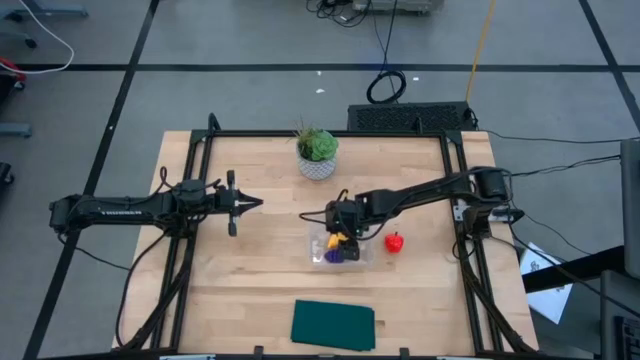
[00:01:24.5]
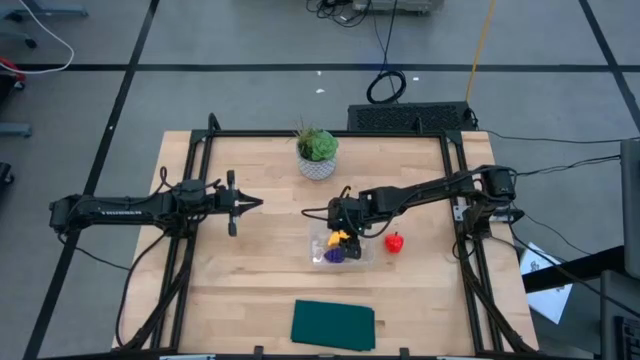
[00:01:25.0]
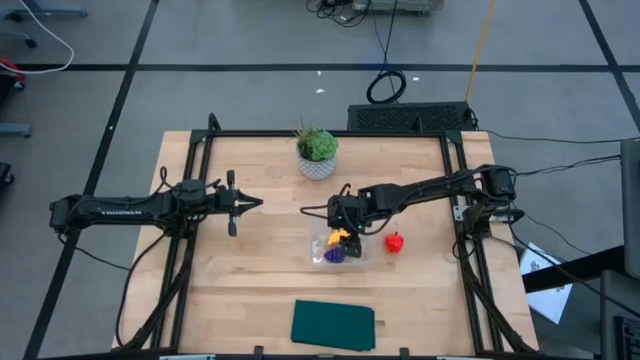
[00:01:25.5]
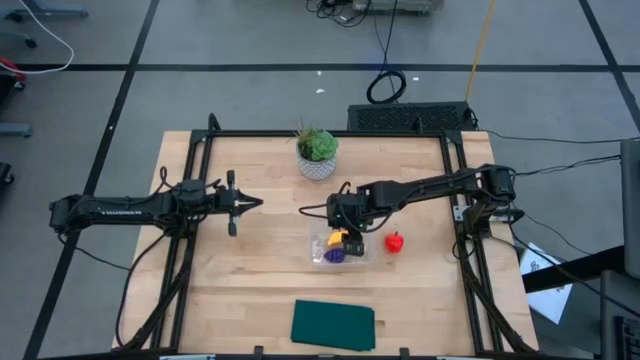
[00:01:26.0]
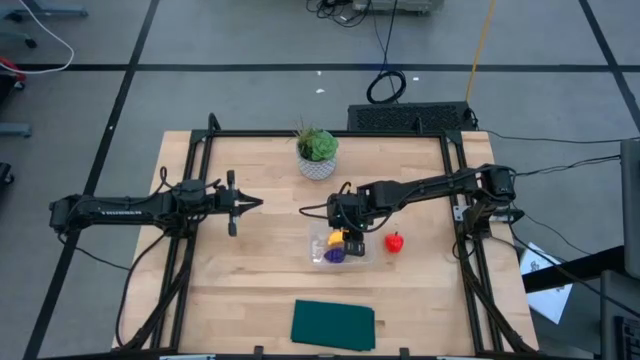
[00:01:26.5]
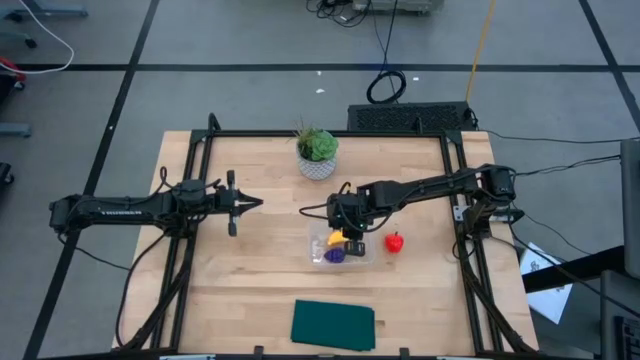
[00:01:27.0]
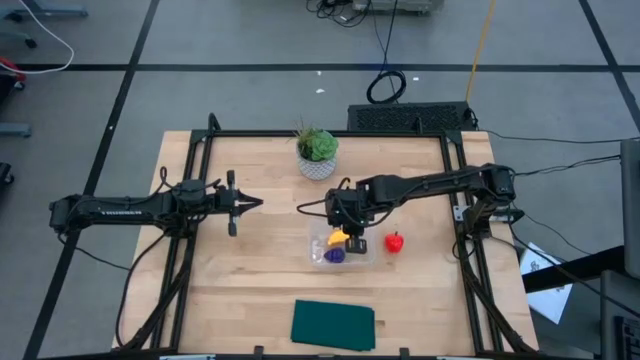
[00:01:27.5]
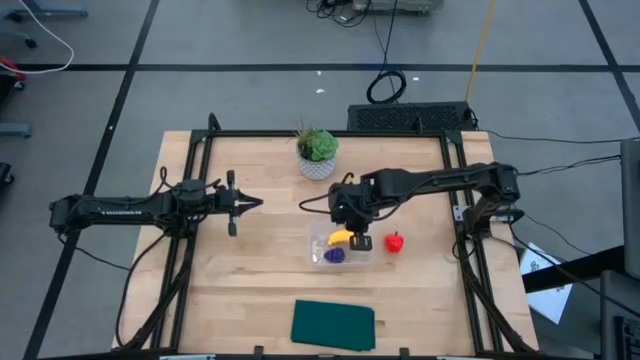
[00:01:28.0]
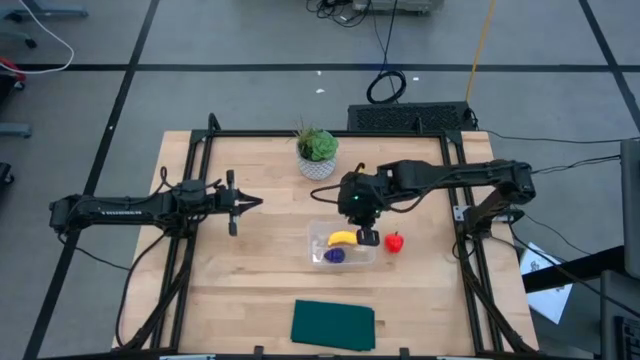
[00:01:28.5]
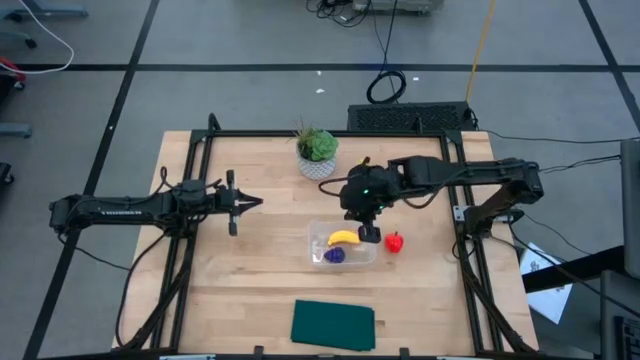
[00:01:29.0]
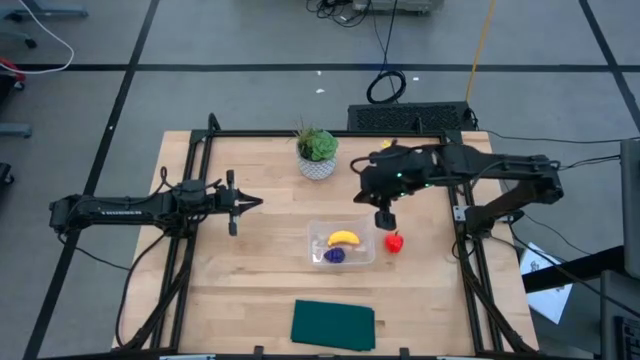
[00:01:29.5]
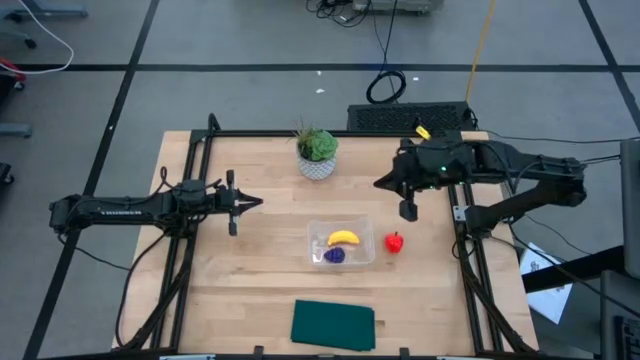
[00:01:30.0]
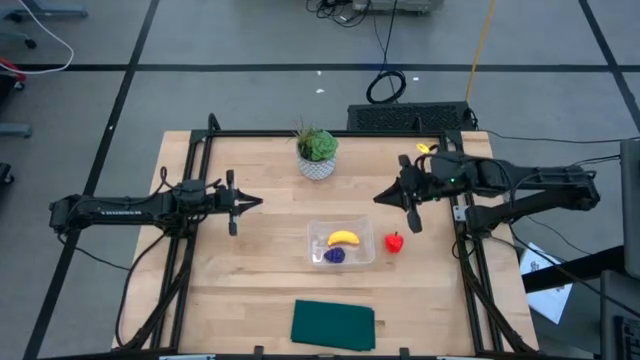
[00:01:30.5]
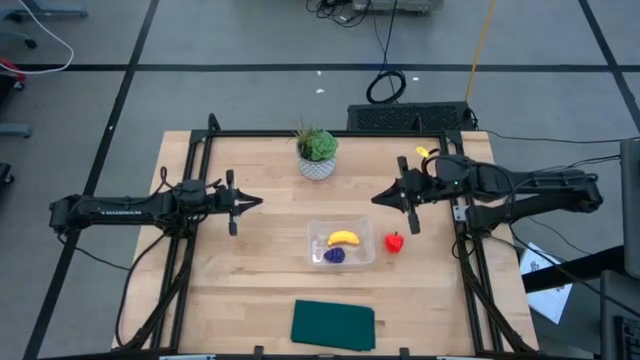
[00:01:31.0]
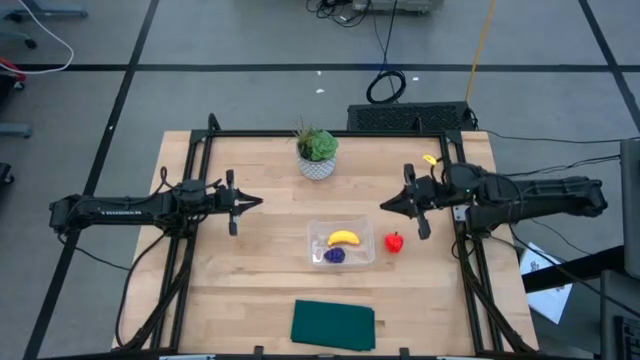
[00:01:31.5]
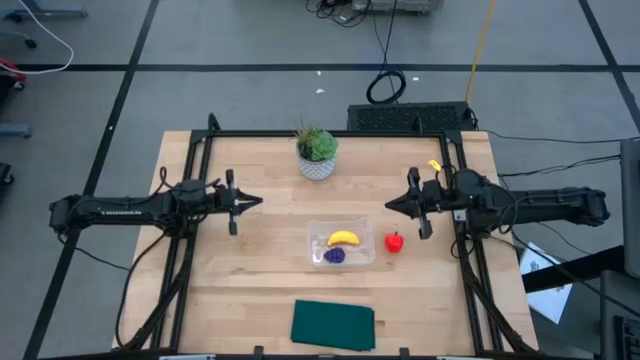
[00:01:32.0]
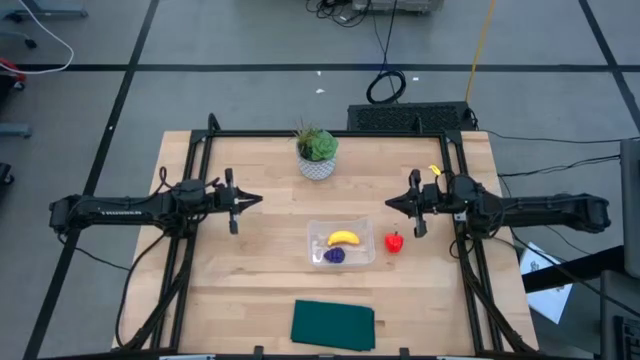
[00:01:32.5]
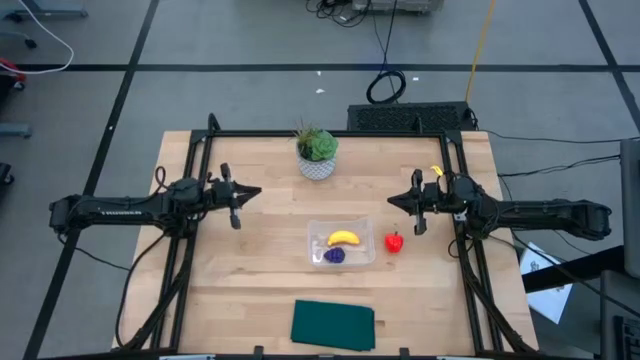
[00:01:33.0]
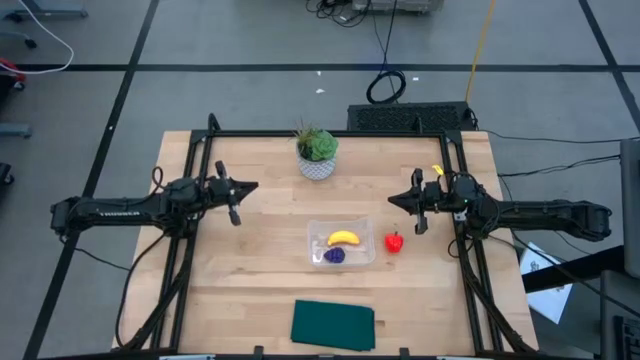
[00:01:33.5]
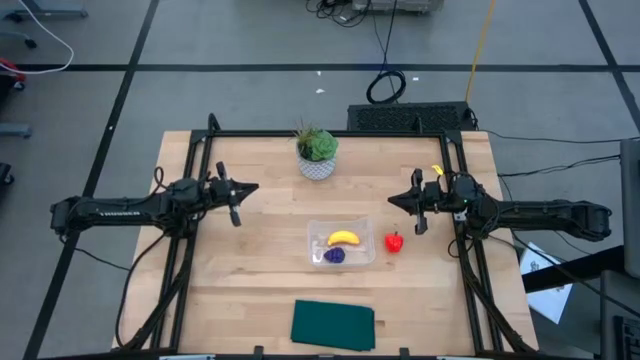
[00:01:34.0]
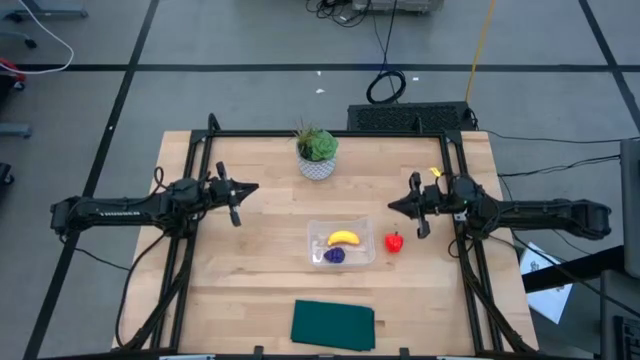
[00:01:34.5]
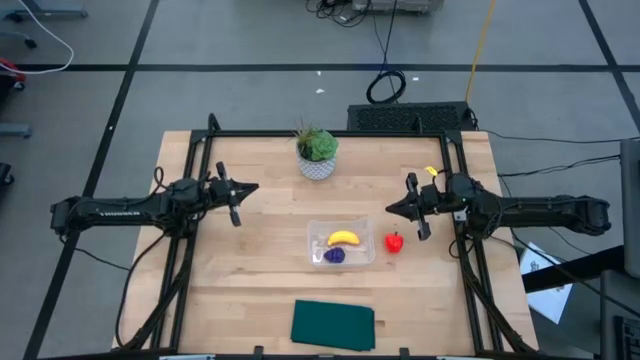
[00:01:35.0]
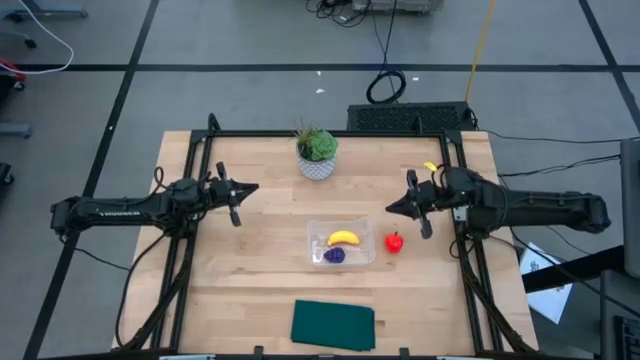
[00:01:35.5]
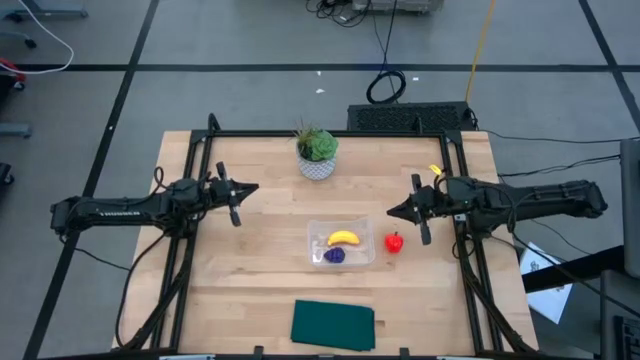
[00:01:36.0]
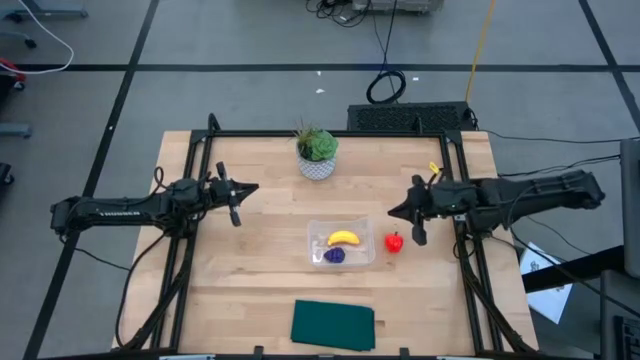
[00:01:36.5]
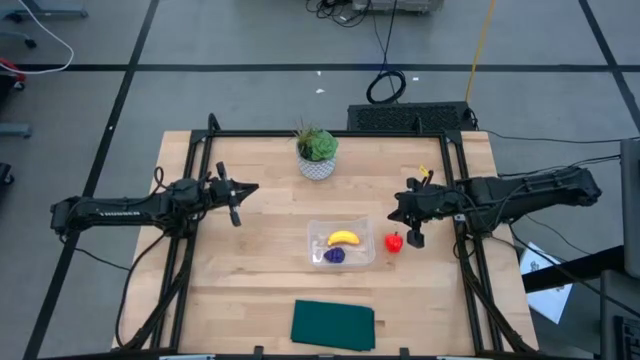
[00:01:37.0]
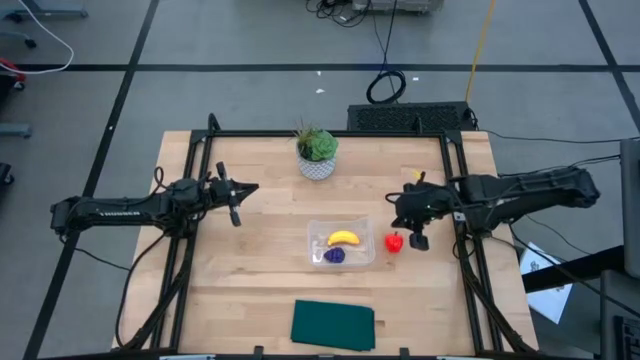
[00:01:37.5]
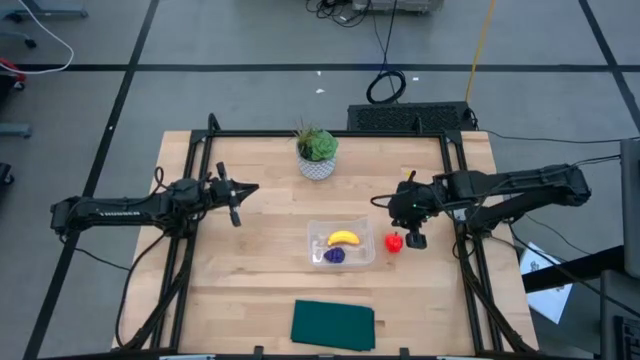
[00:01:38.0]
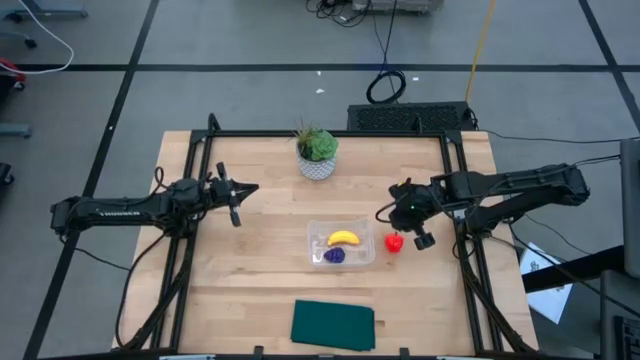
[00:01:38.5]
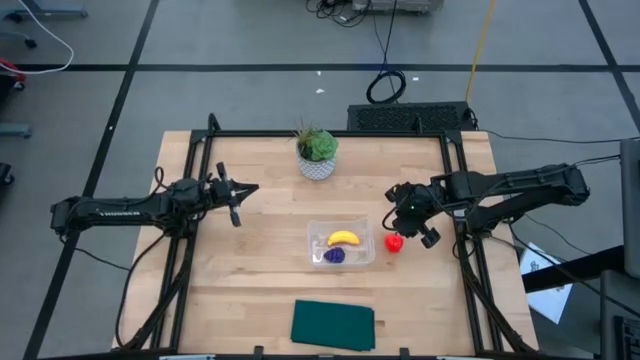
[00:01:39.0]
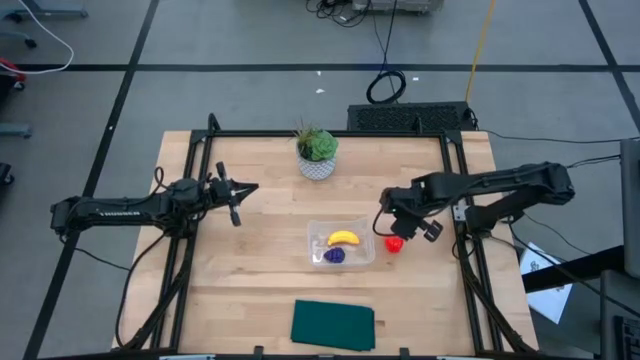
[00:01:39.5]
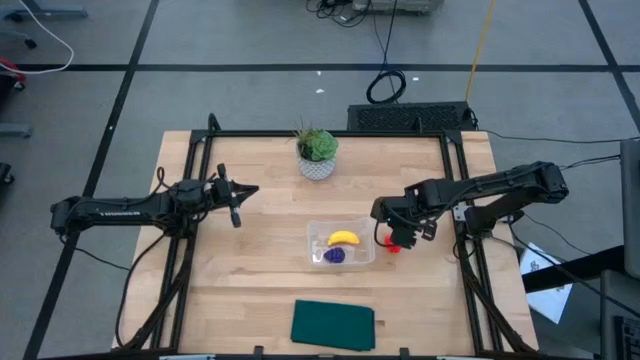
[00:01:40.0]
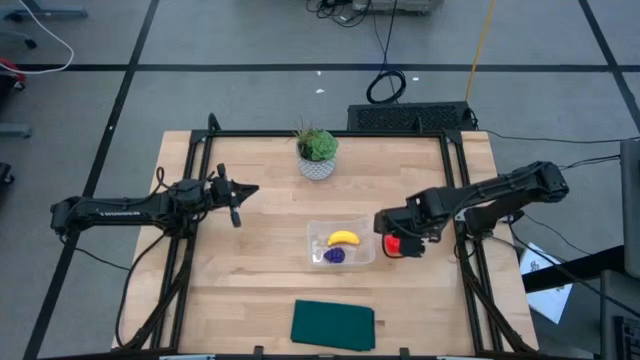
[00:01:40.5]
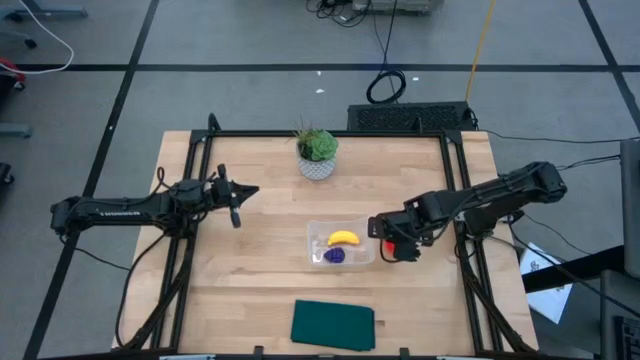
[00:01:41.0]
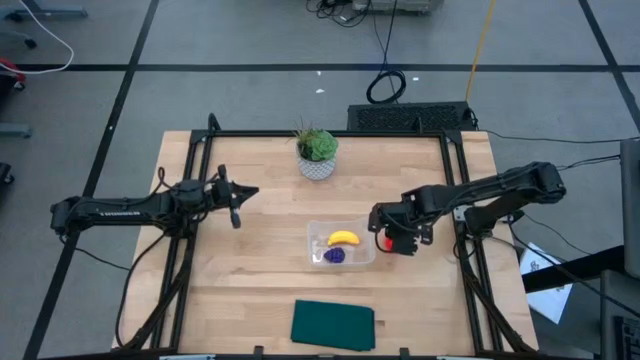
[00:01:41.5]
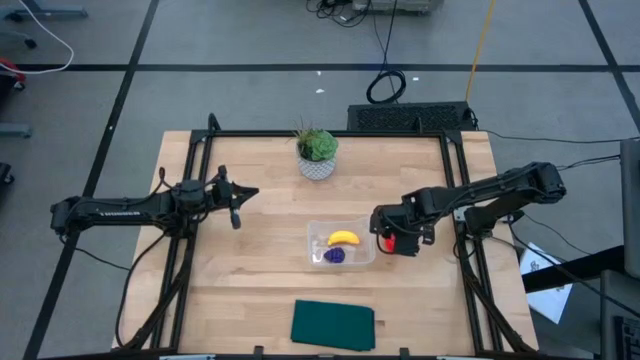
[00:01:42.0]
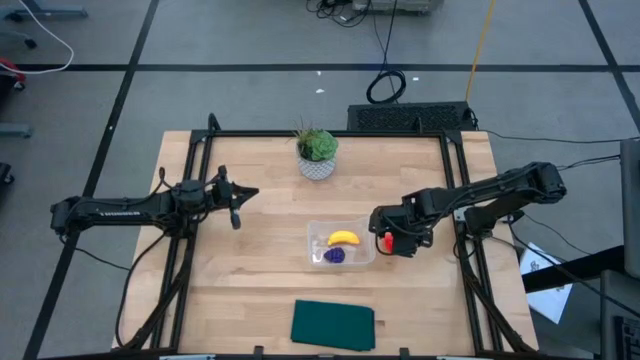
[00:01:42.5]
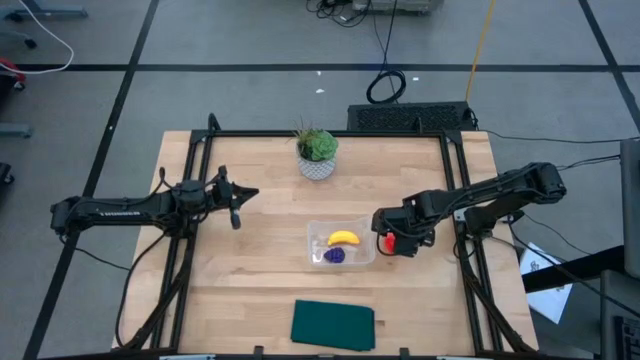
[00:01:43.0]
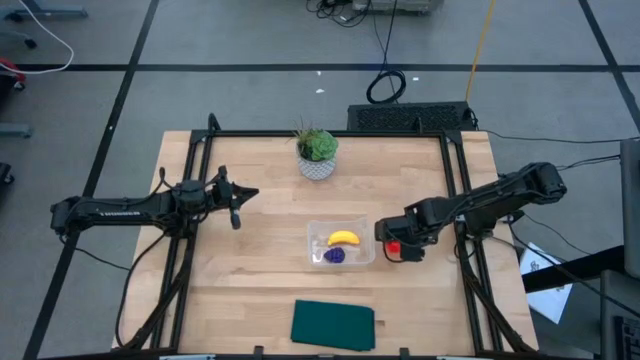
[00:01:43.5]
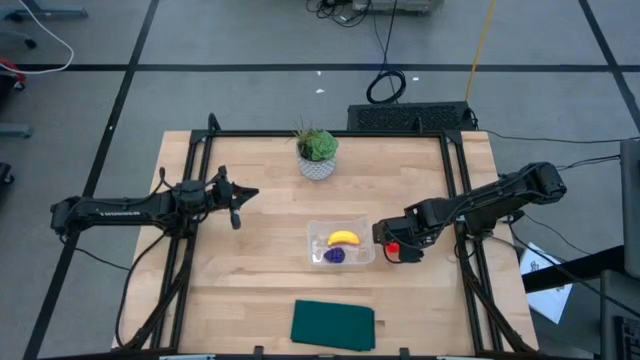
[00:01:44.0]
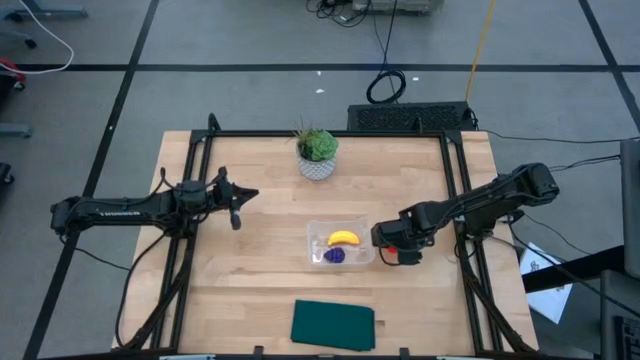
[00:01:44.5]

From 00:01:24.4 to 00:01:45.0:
Task: Pick and placing Produce into tupperware
Put the apple into the transparent bin
